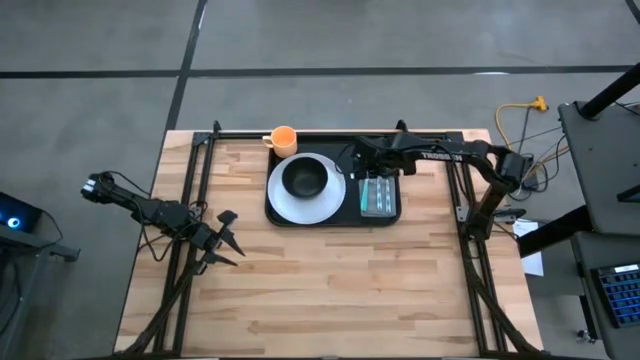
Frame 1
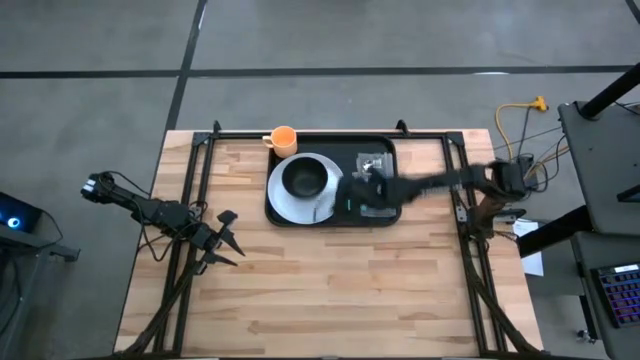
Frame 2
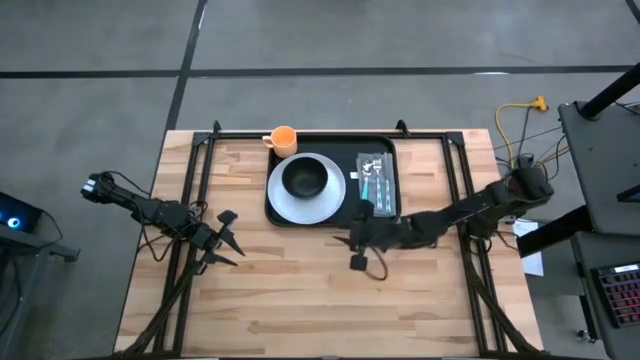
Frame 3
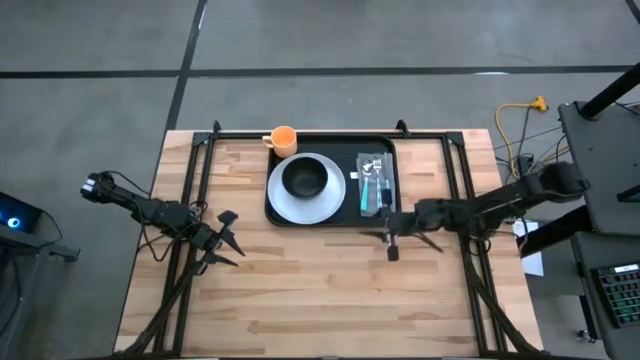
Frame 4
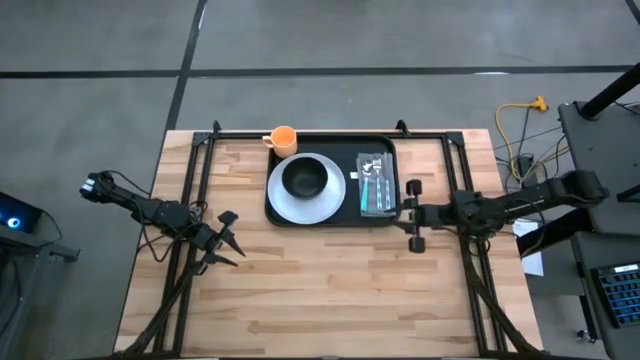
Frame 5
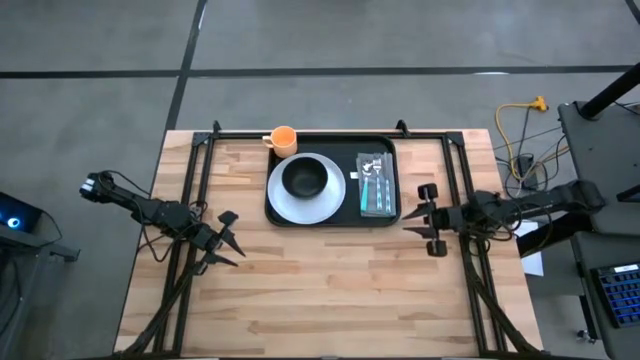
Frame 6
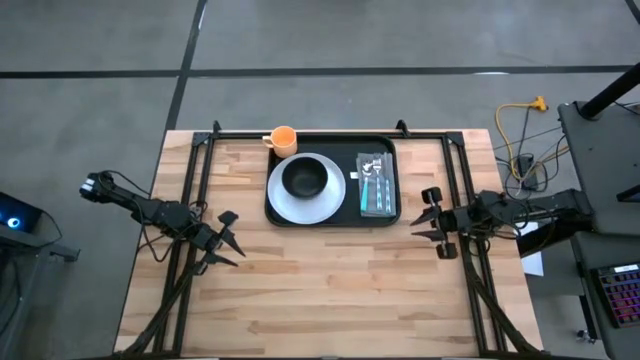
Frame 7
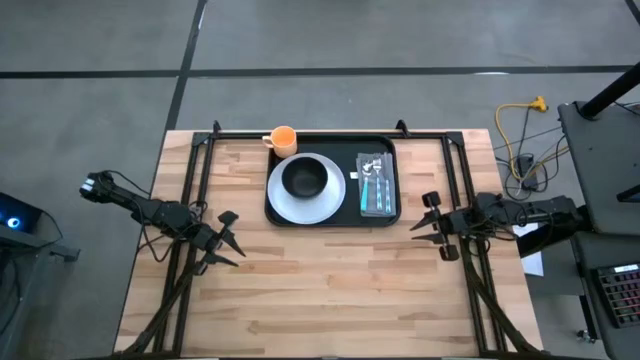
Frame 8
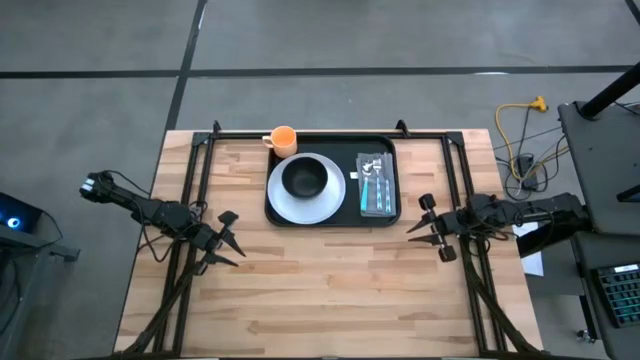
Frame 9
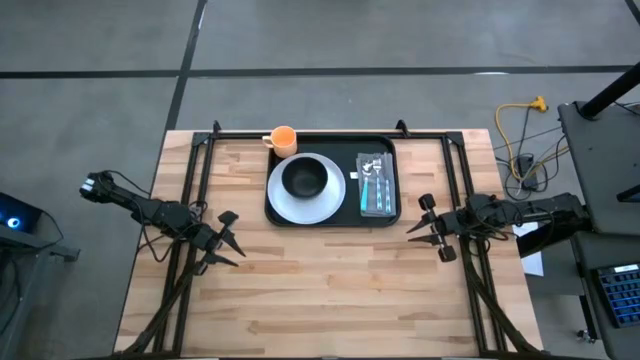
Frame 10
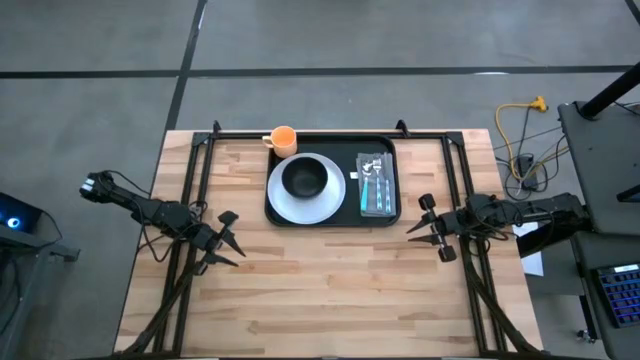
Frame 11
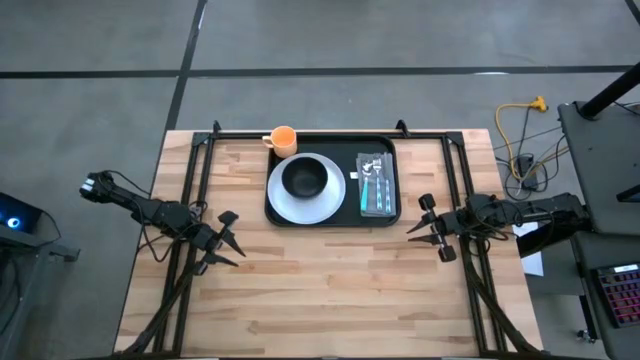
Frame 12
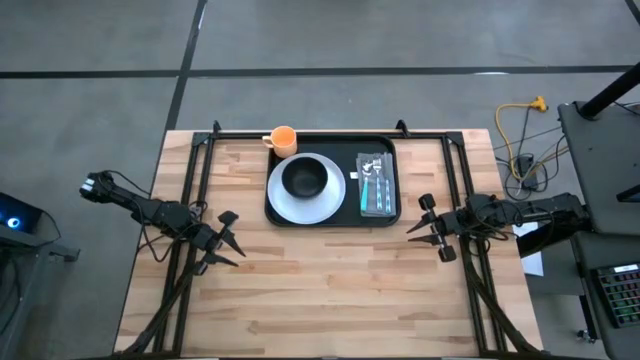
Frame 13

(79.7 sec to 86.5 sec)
Task: Set up tray
Return to Home Position

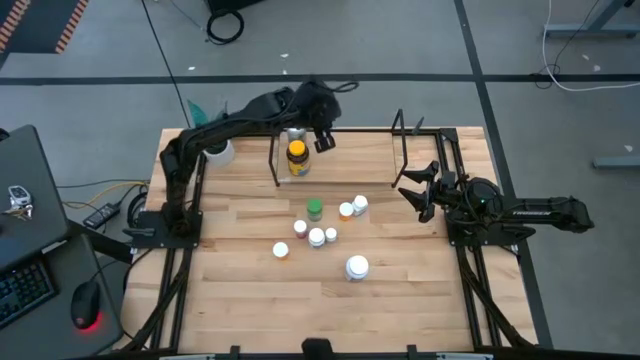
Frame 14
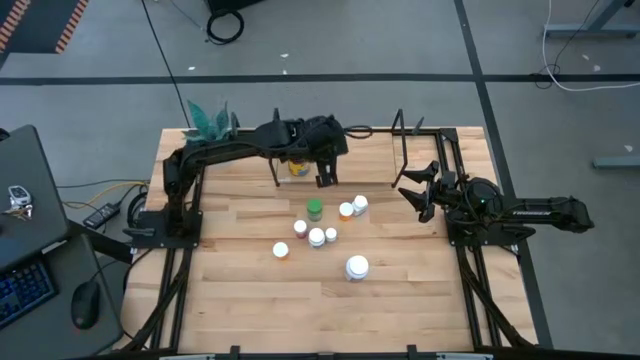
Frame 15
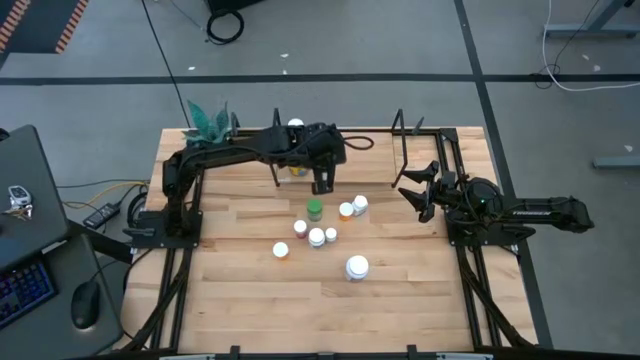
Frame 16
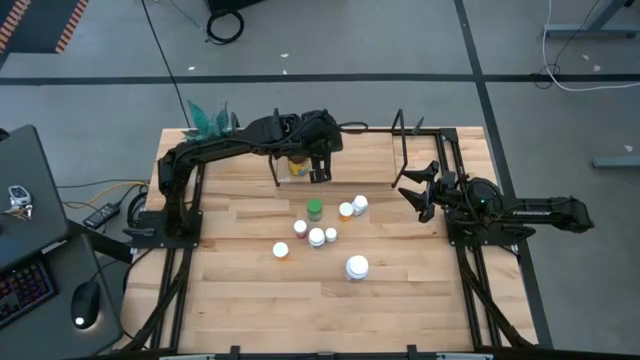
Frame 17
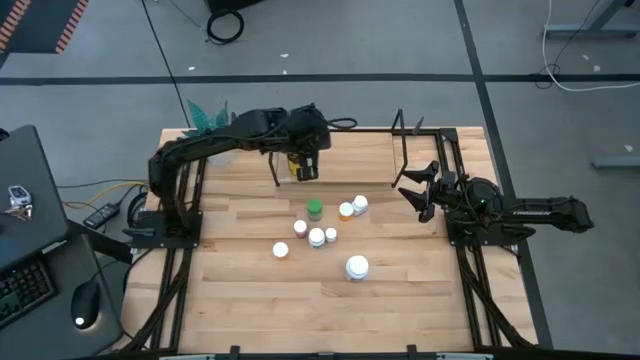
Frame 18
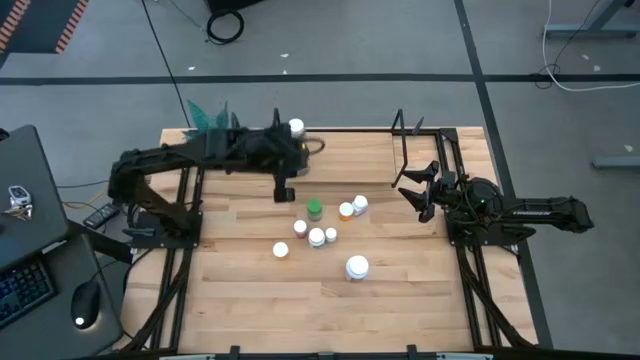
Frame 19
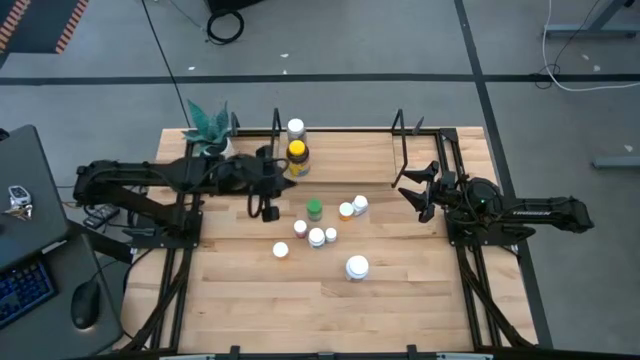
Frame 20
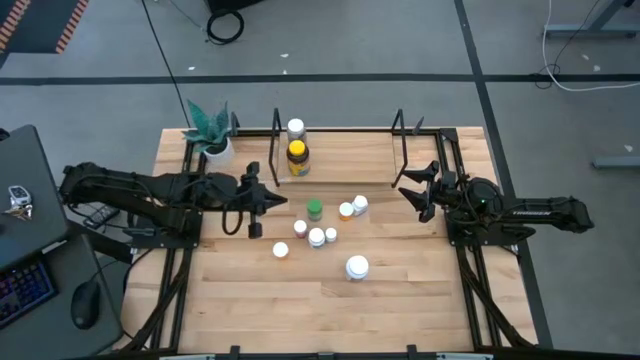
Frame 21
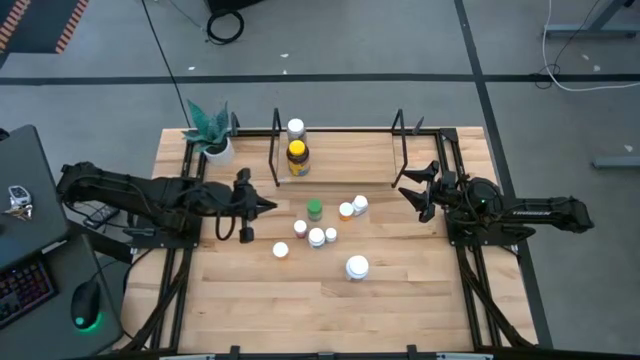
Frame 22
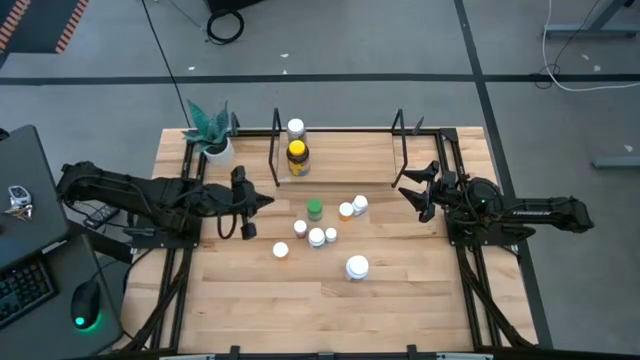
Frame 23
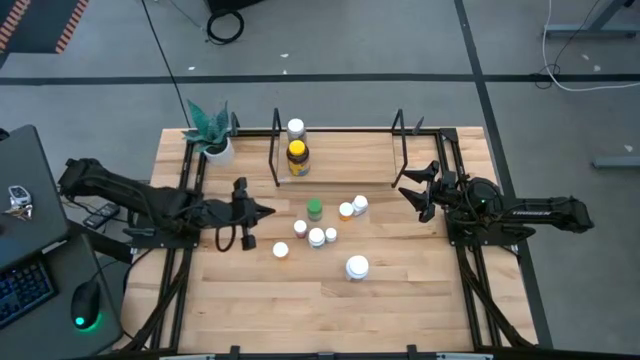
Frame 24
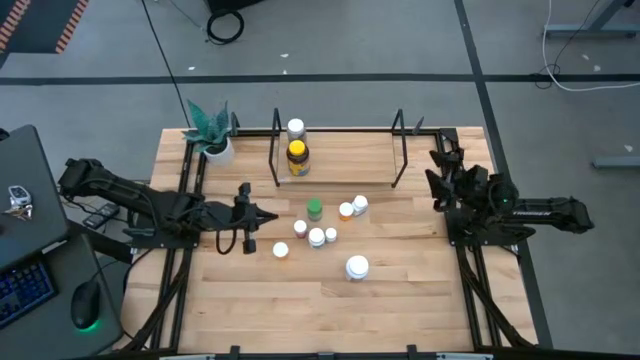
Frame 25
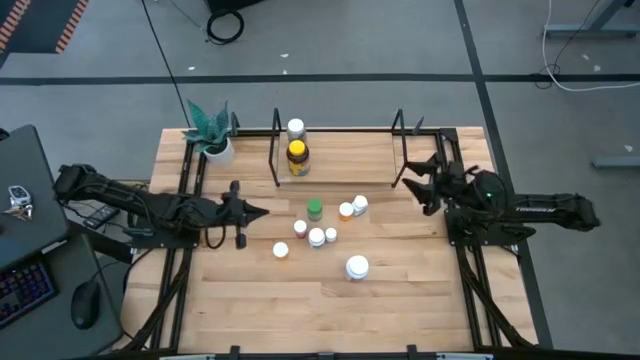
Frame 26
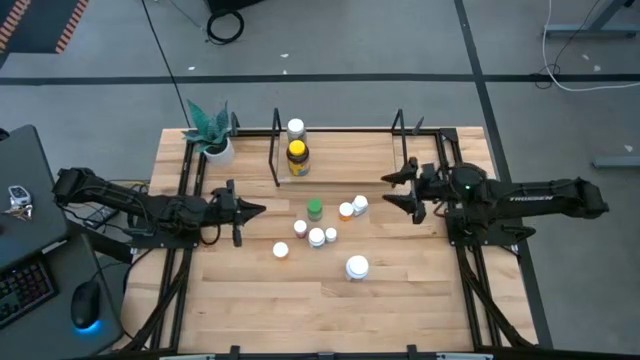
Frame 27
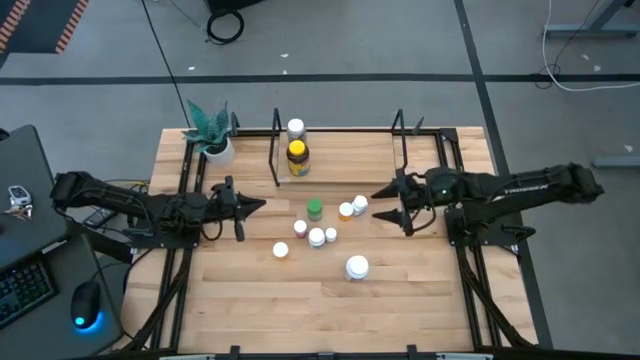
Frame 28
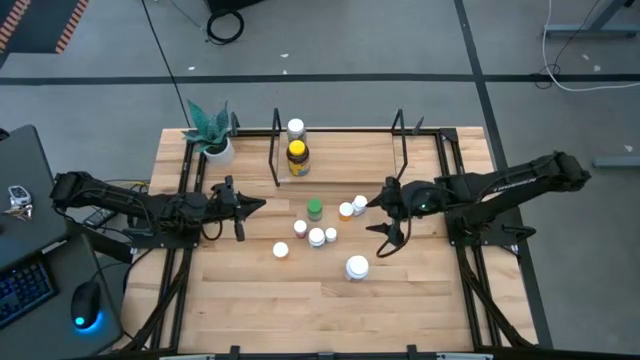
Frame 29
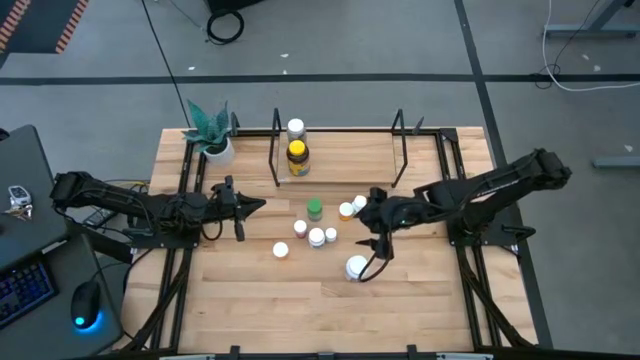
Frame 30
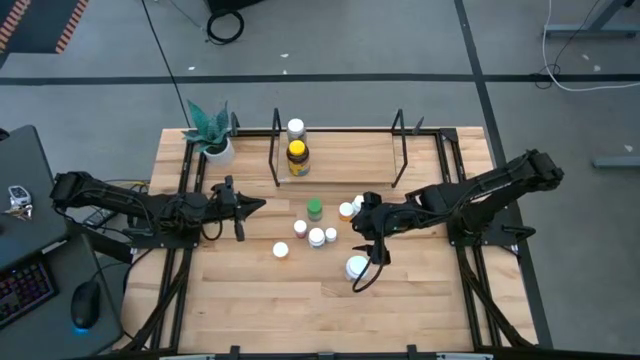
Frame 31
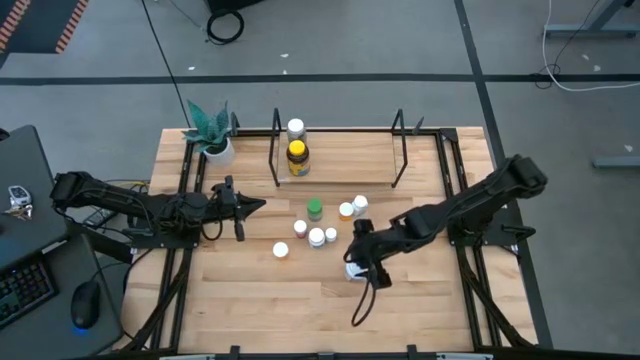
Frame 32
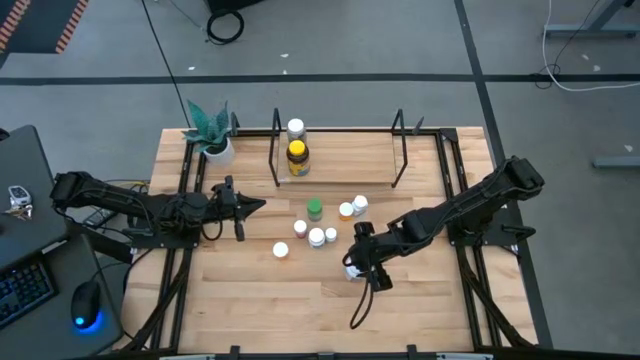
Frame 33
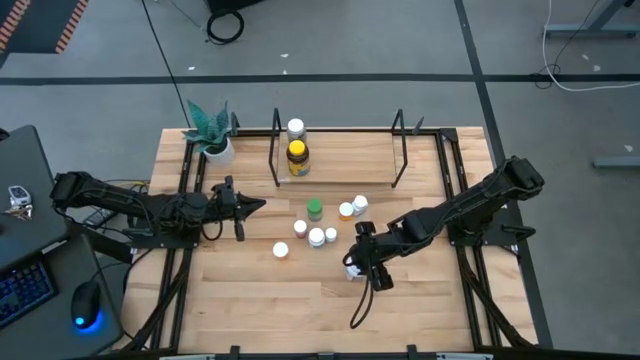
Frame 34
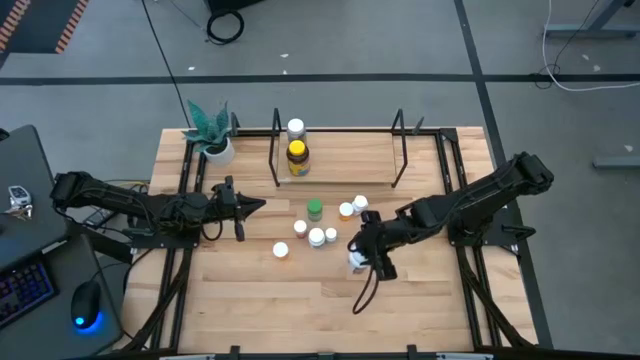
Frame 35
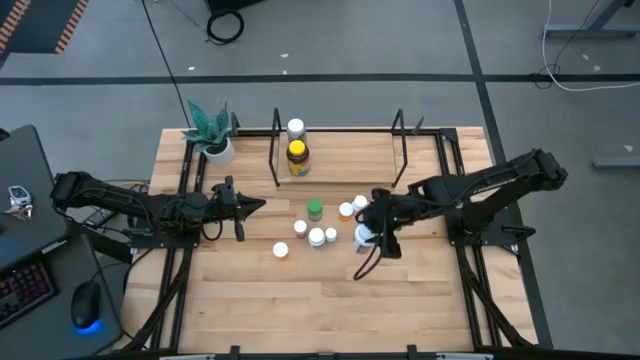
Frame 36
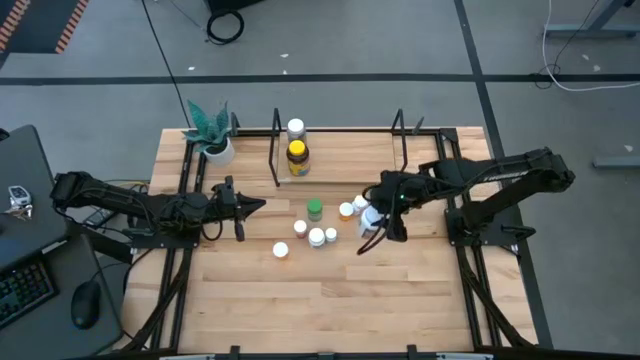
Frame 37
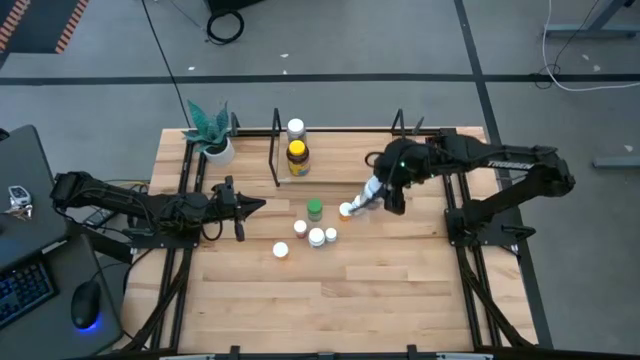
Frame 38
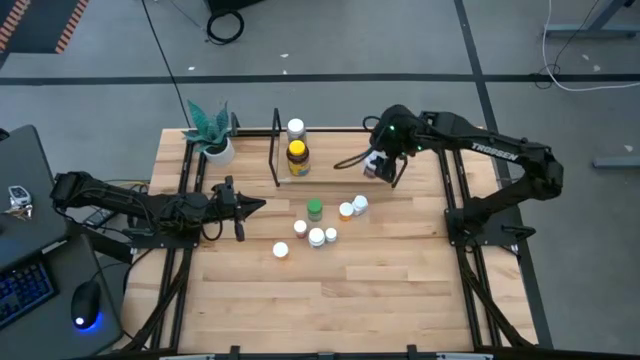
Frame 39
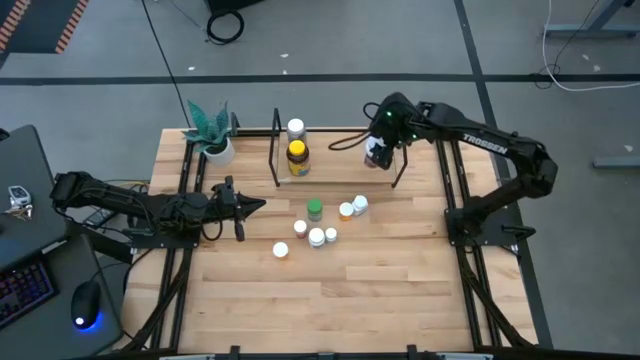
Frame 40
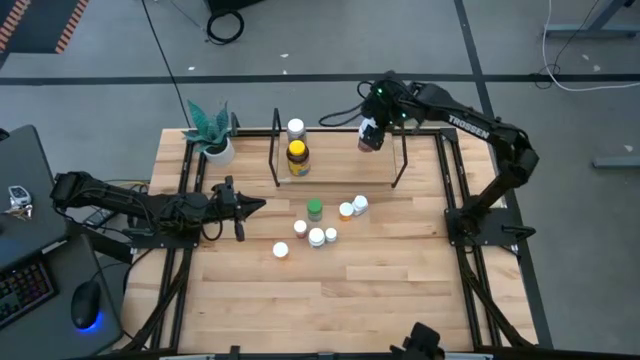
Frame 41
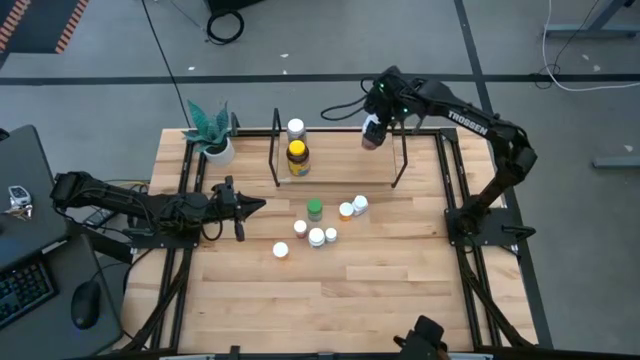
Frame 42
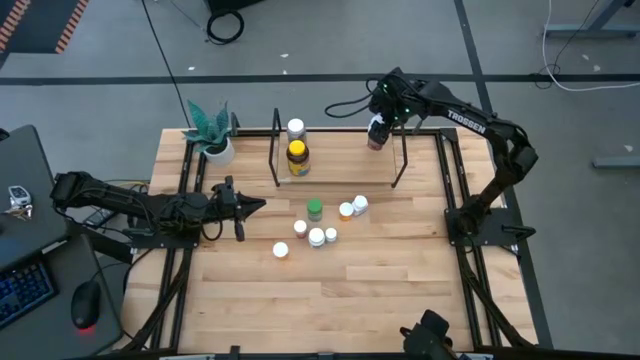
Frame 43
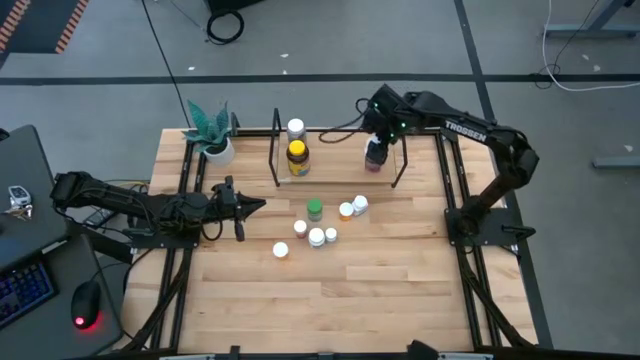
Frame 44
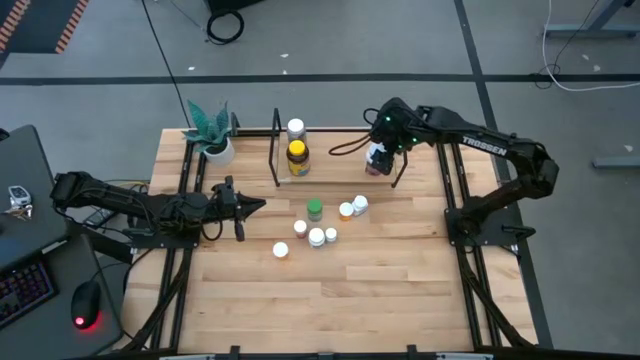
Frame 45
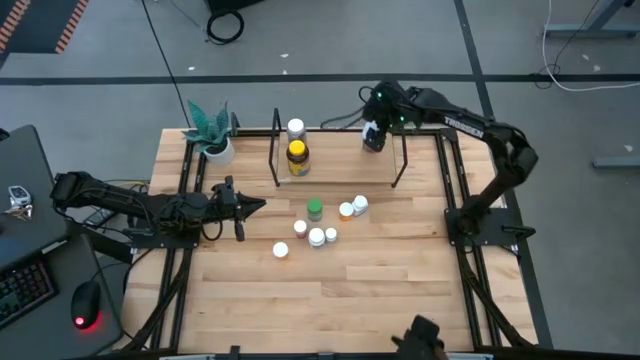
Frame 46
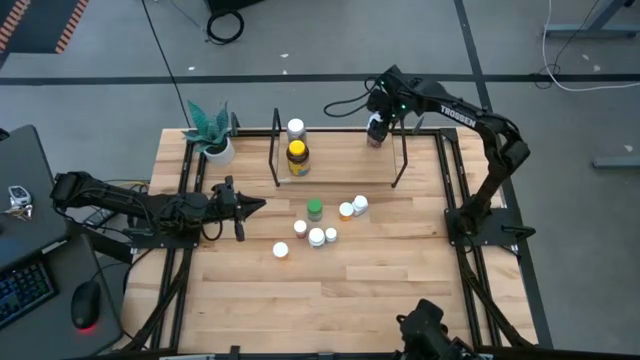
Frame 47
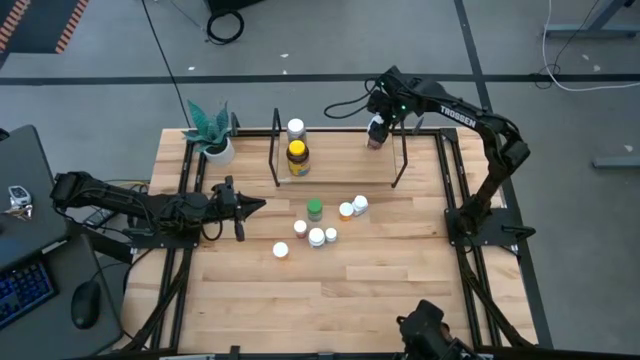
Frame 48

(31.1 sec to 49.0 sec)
Task: Pick and place medicine bottles onto shelf by color
Put the white and red medicine bottle on the shelf
